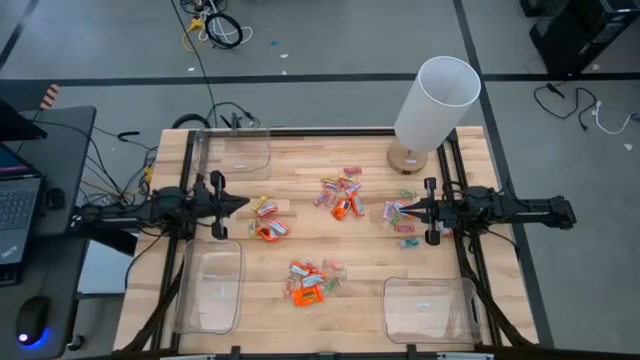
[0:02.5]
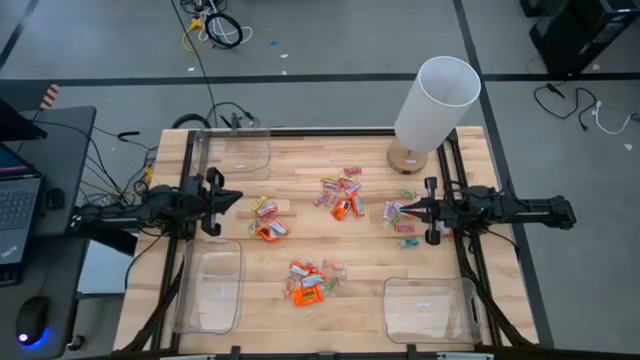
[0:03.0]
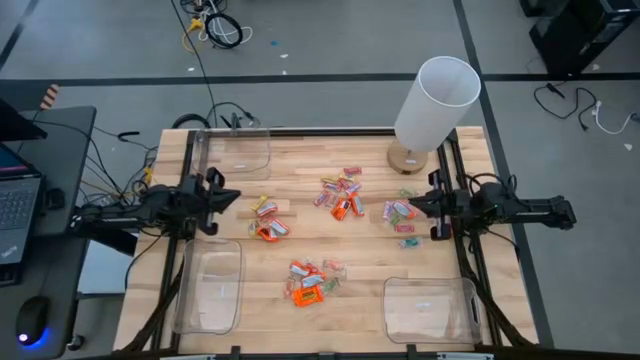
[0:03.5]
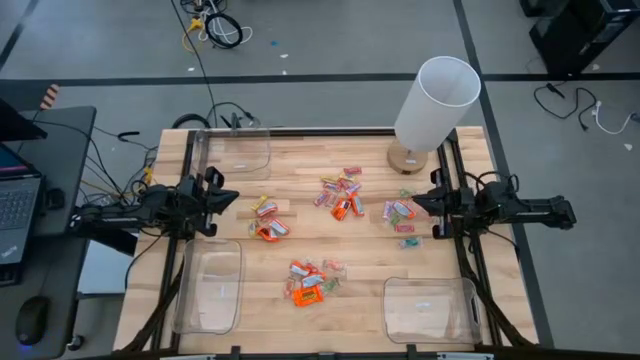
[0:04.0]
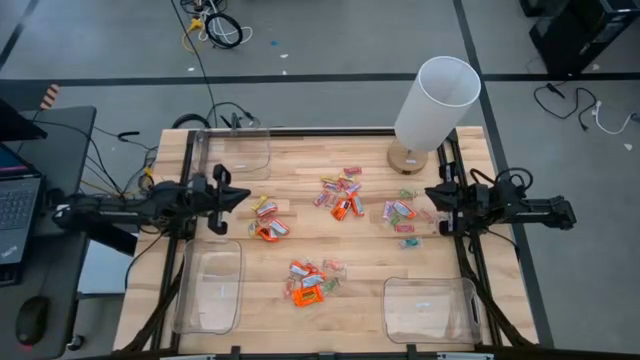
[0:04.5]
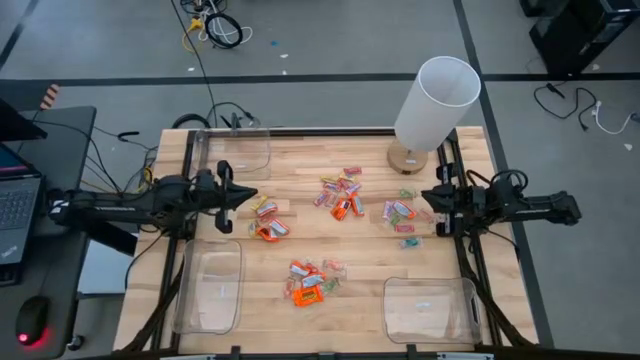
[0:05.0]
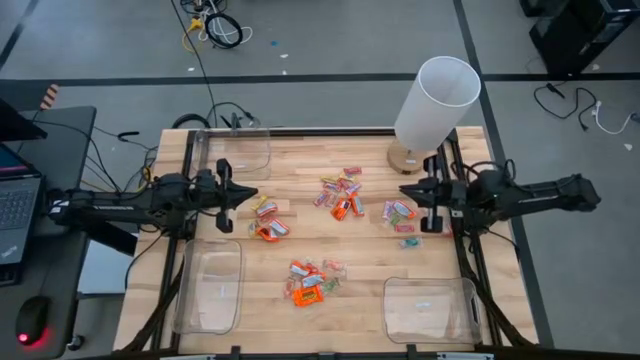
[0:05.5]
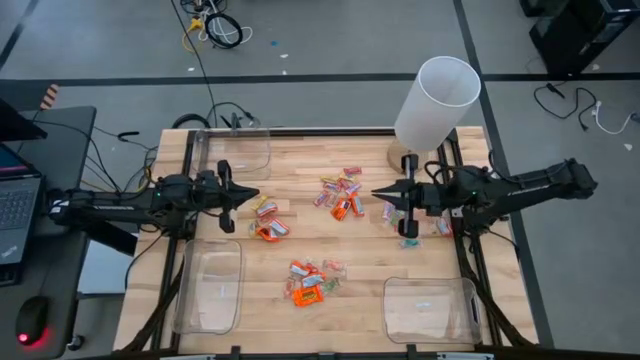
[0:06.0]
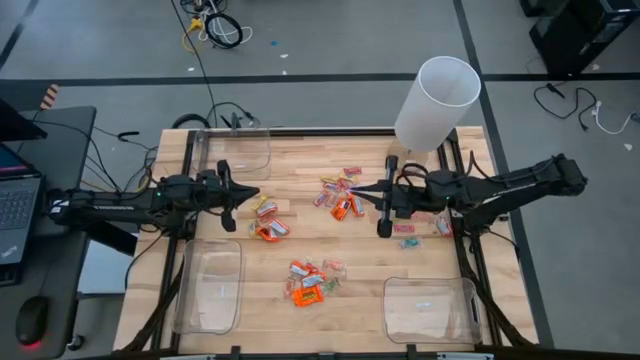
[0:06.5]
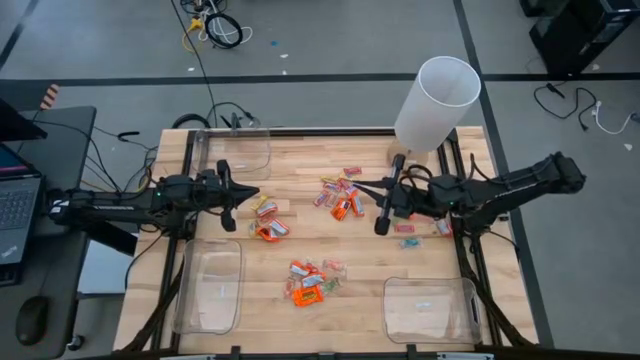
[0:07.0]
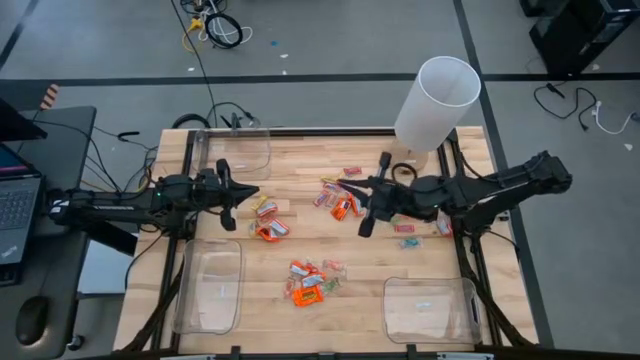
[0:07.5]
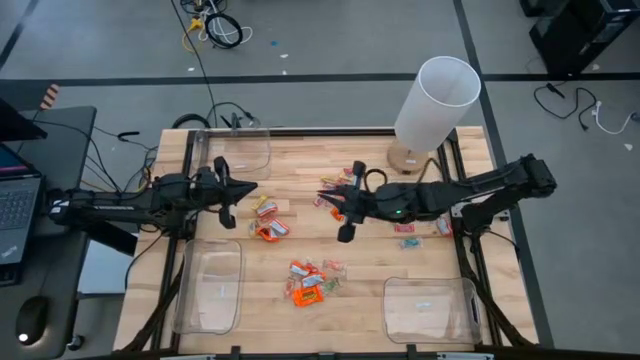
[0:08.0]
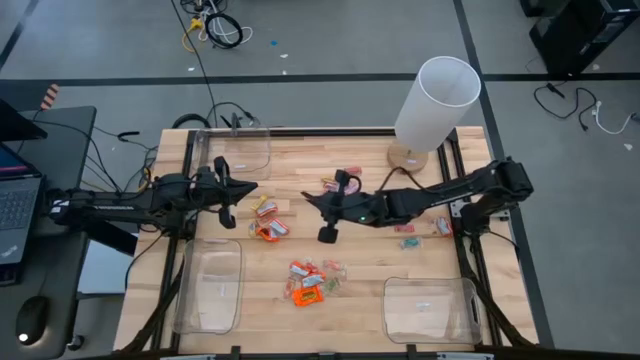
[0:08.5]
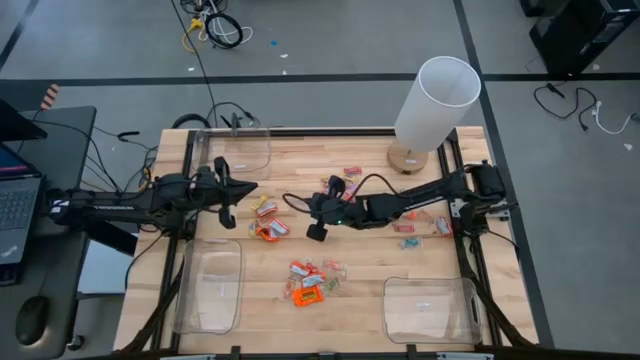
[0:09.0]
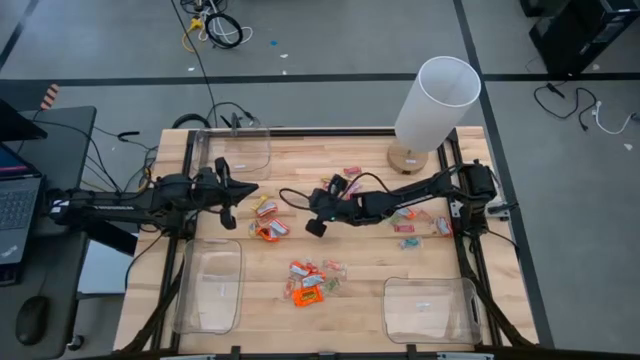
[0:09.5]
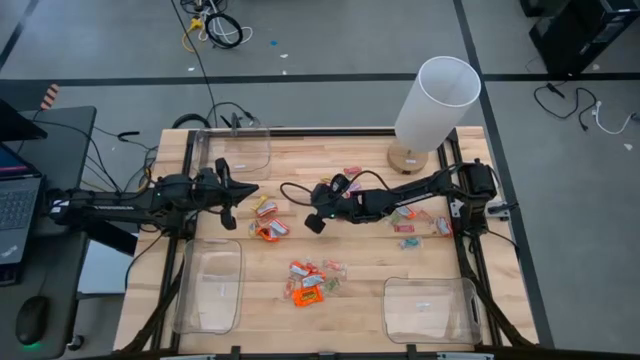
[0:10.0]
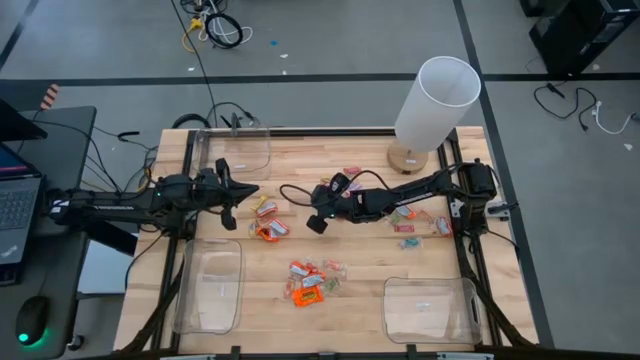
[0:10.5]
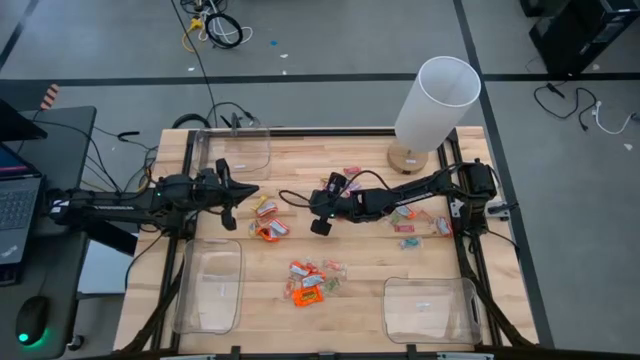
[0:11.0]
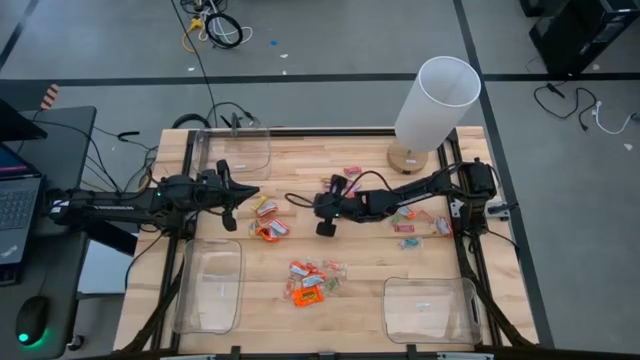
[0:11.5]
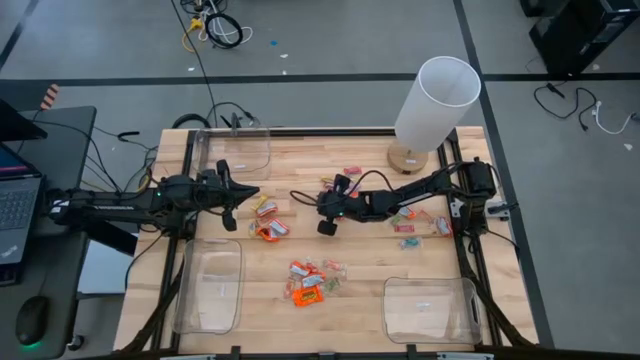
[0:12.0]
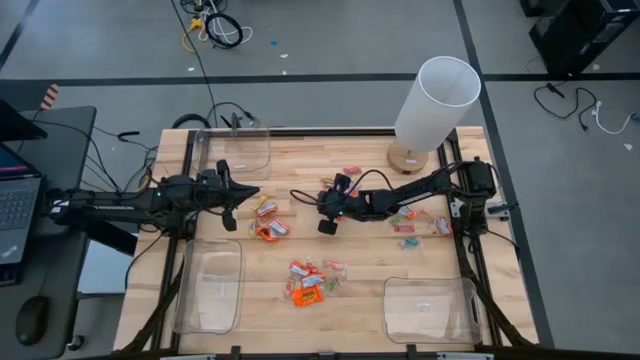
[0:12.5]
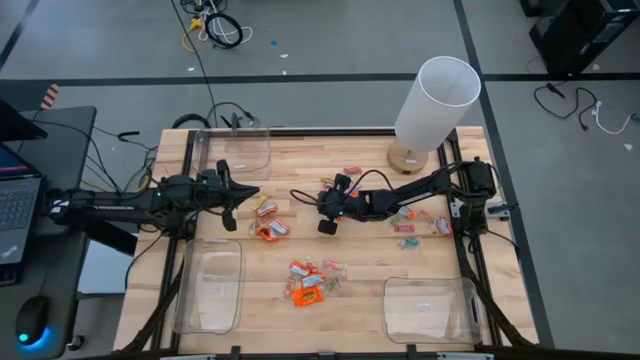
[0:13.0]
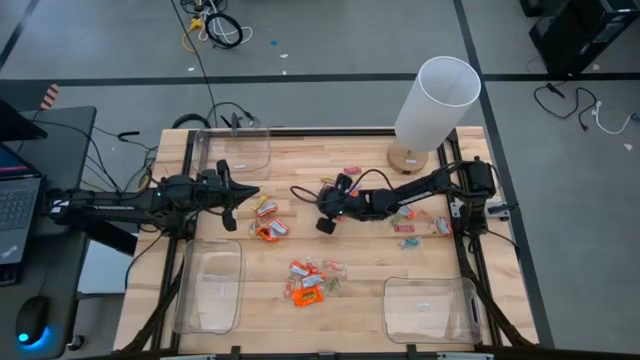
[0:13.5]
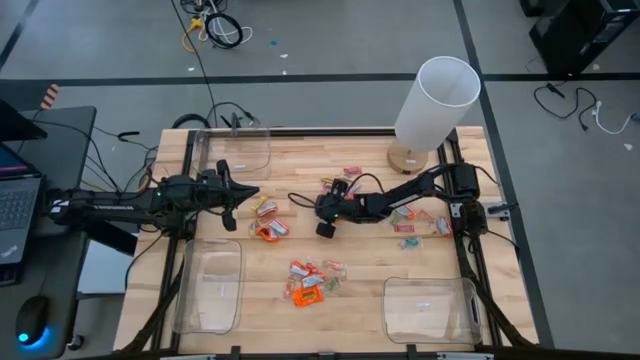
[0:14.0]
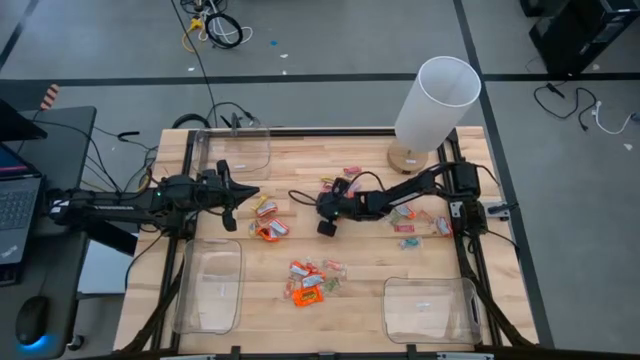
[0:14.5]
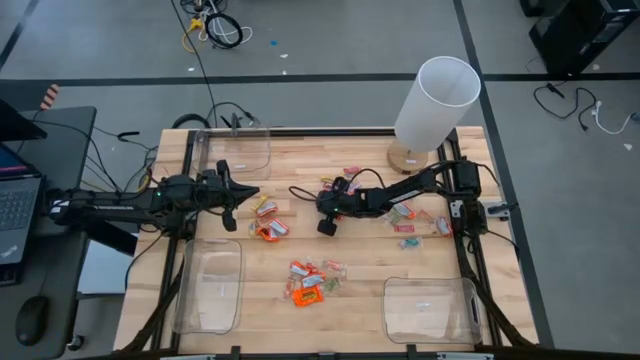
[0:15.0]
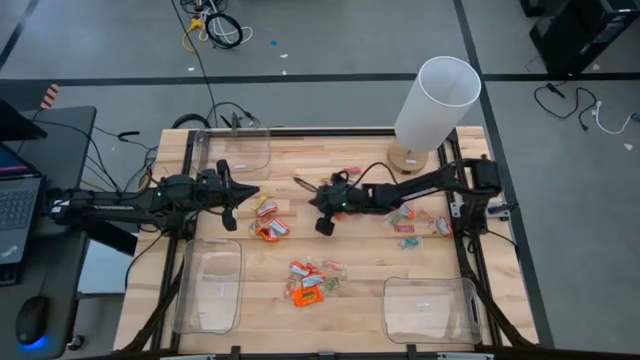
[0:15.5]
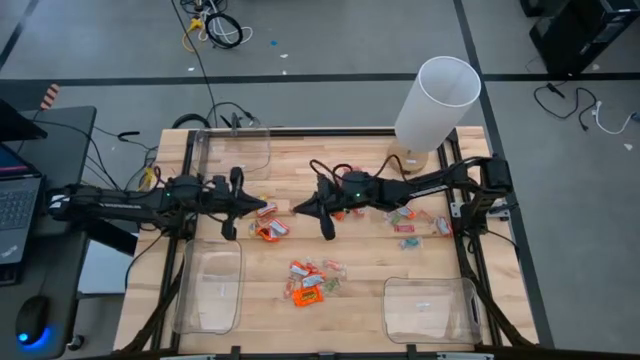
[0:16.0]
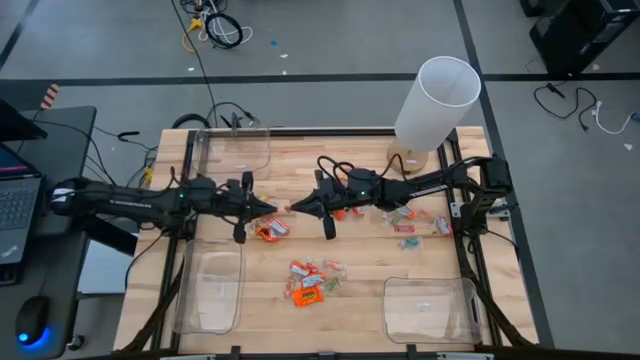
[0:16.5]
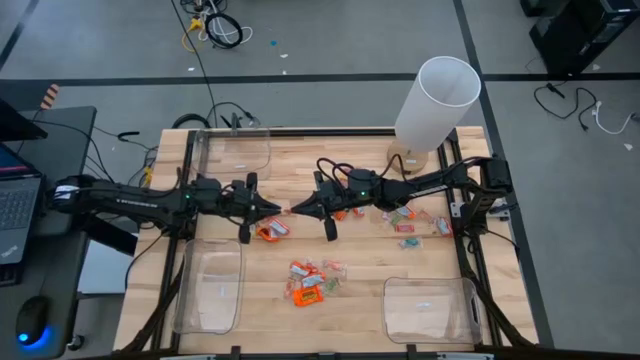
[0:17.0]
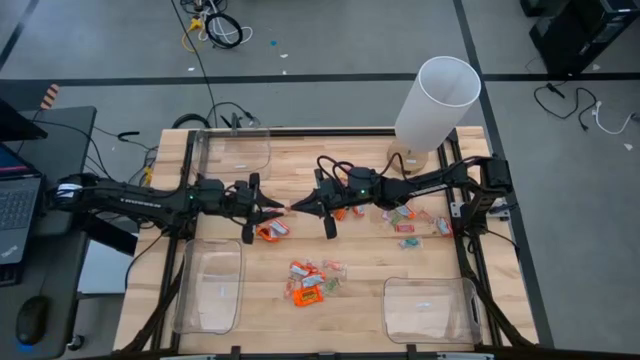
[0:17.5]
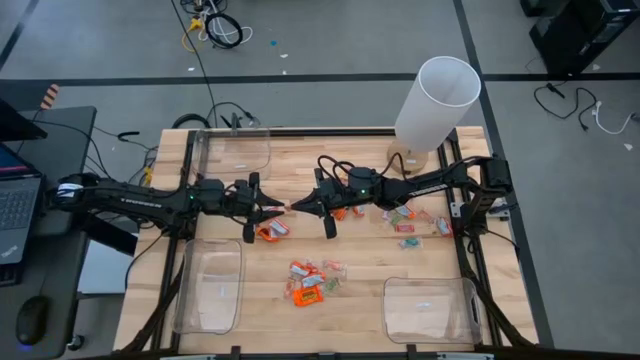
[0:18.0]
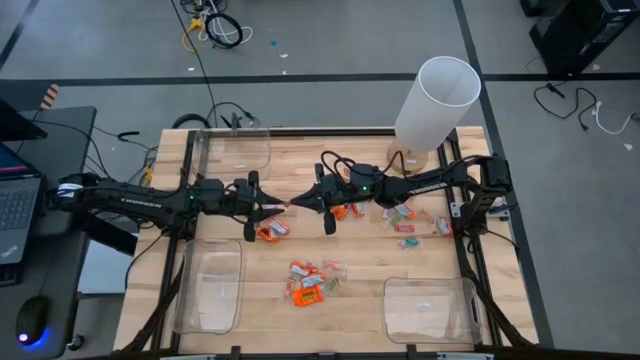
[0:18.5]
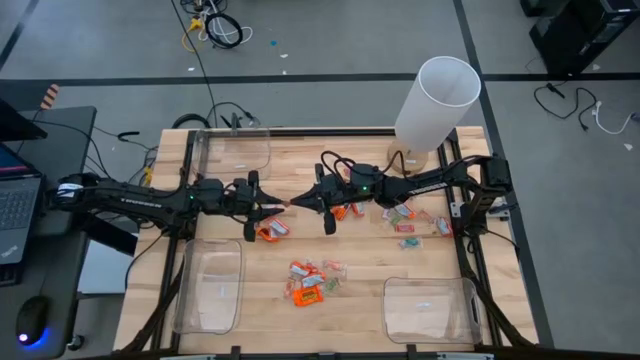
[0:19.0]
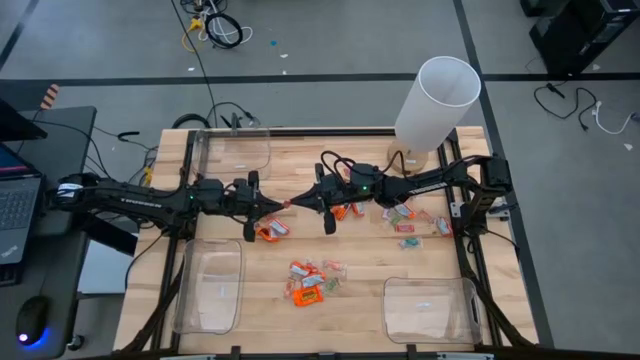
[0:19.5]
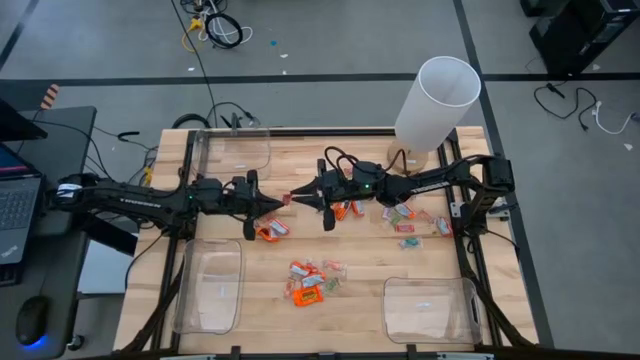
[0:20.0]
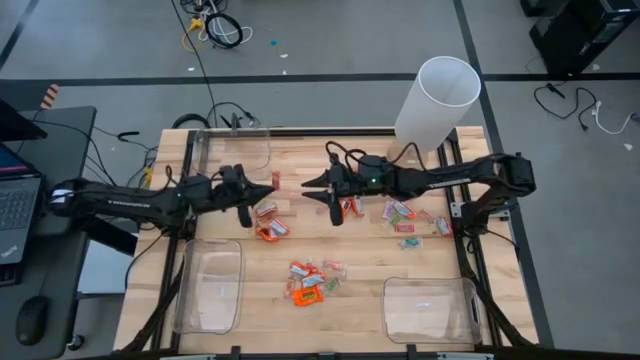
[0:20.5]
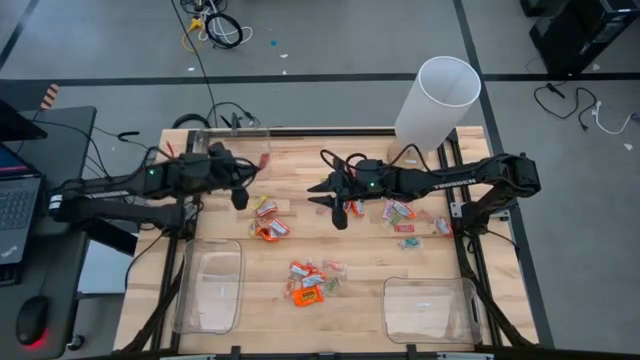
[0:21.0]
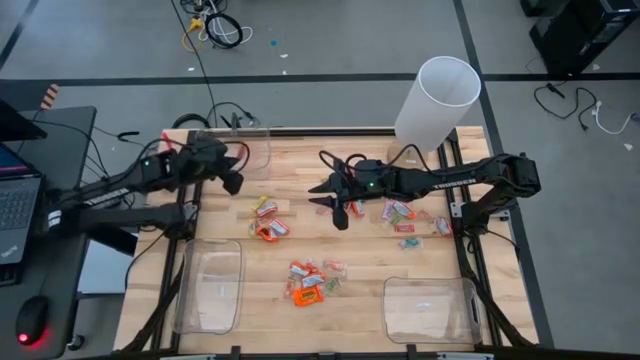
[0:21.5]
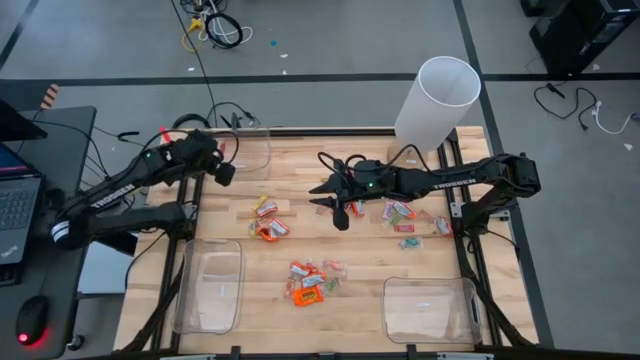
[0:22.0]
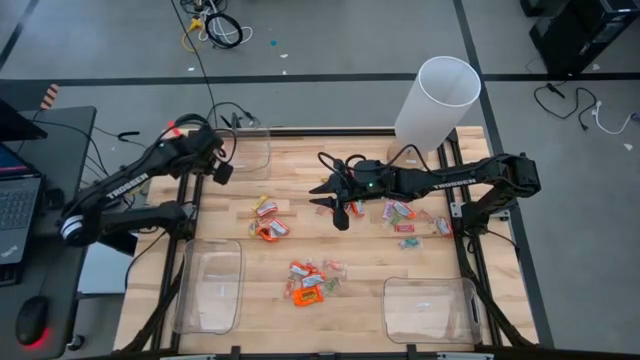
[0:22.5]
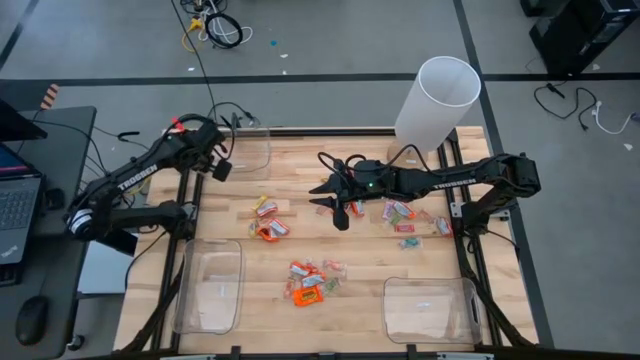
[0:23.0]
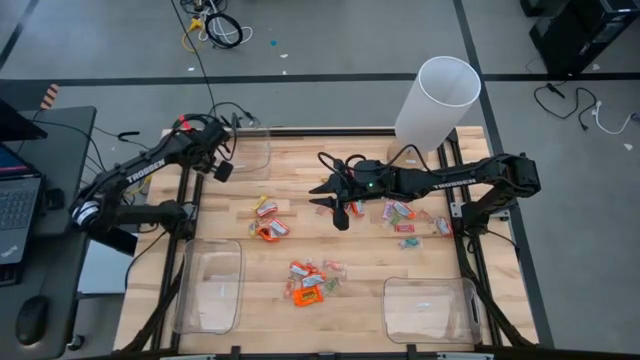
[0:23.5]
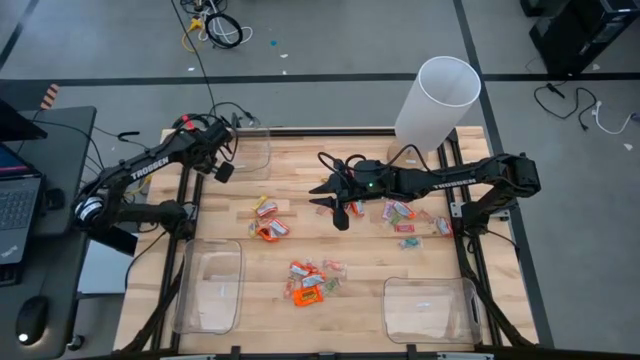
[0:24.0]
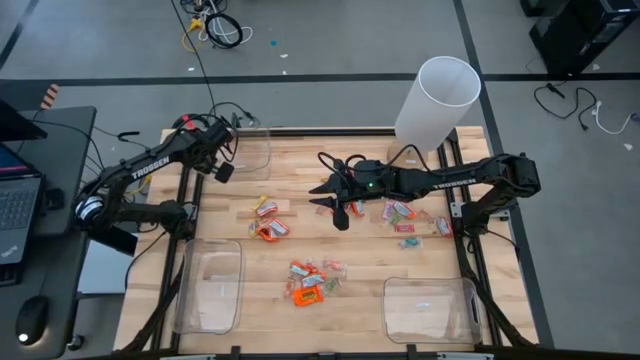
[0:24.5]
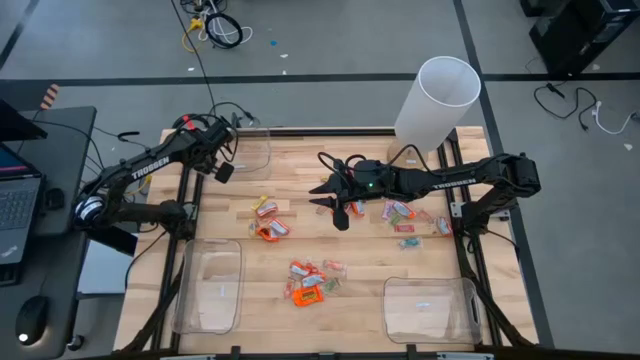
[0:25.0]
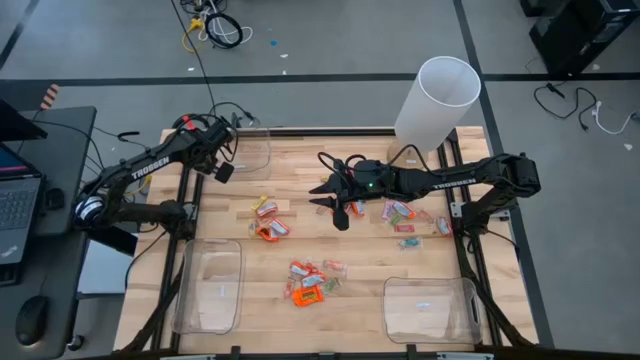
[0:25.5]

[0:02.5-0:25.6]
Task: Sort candy
Put the red candy into the top left transparent bin
